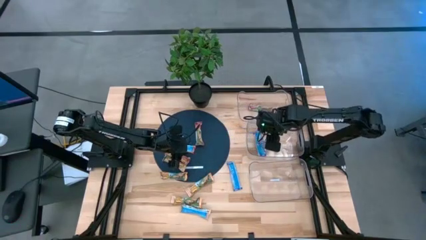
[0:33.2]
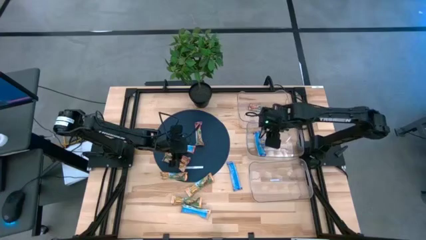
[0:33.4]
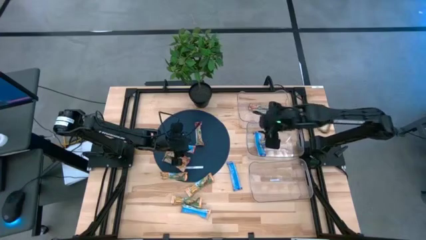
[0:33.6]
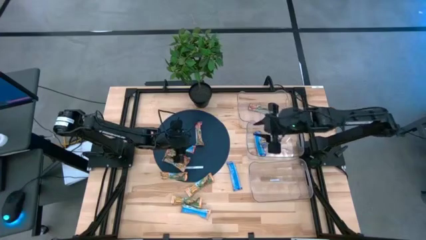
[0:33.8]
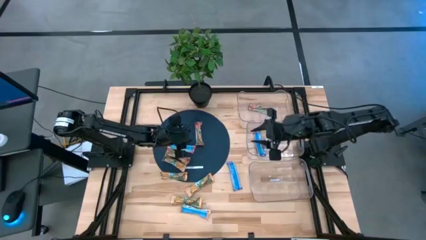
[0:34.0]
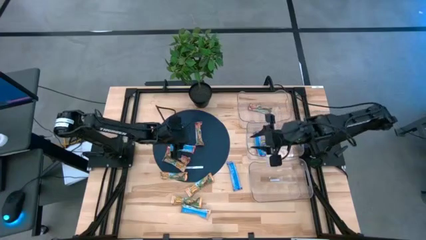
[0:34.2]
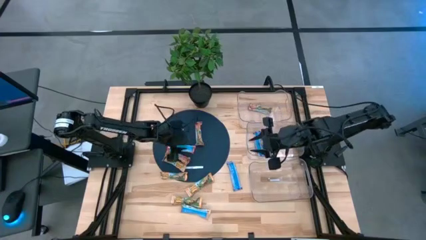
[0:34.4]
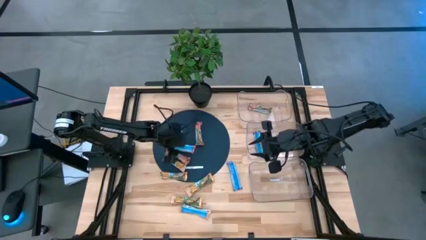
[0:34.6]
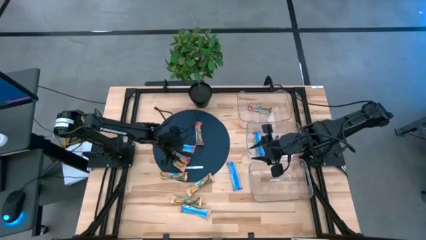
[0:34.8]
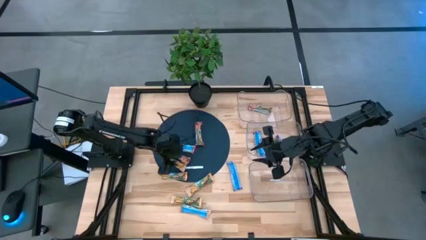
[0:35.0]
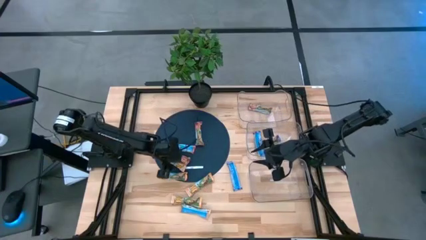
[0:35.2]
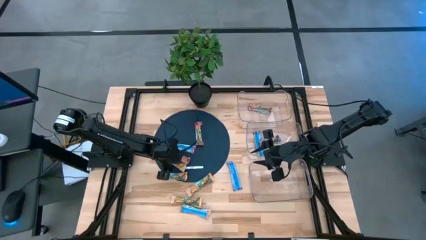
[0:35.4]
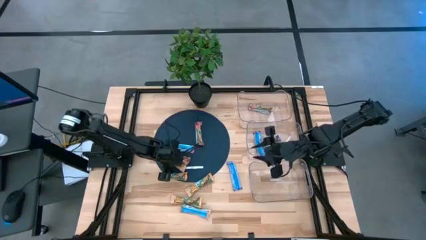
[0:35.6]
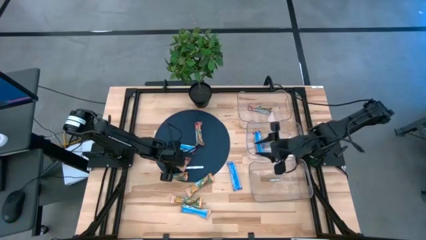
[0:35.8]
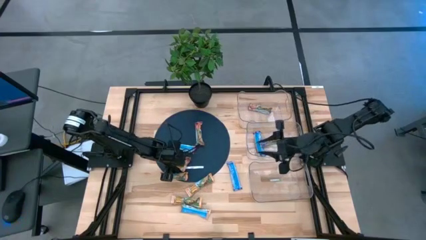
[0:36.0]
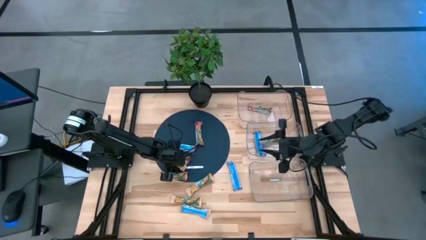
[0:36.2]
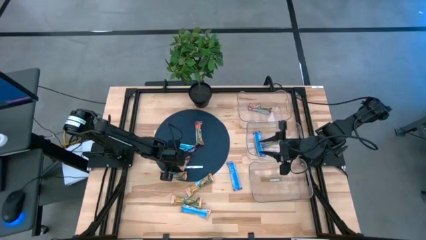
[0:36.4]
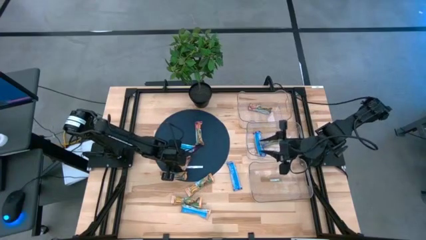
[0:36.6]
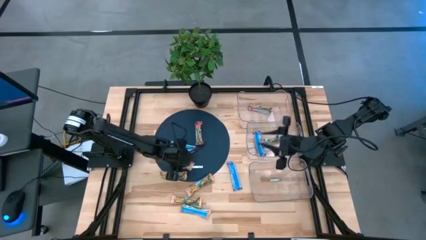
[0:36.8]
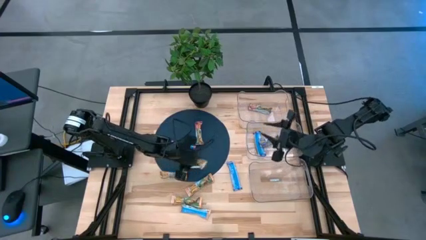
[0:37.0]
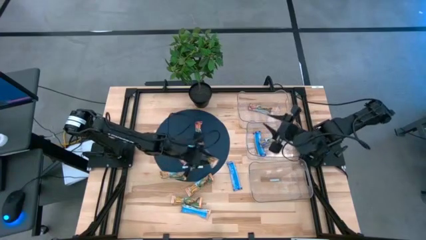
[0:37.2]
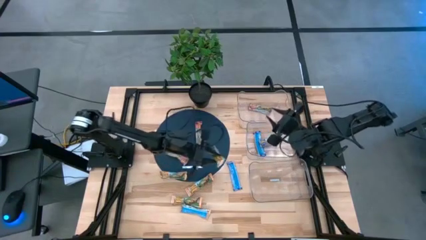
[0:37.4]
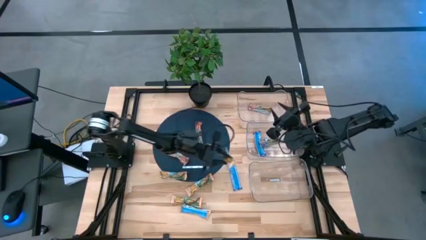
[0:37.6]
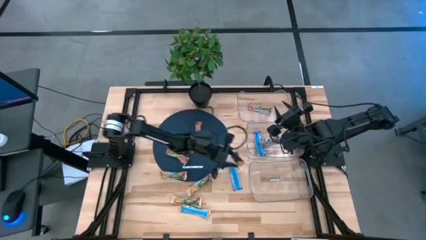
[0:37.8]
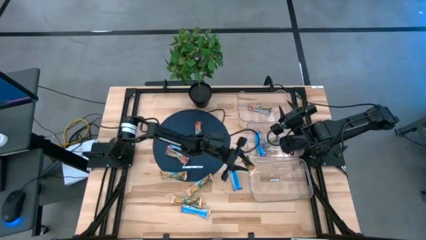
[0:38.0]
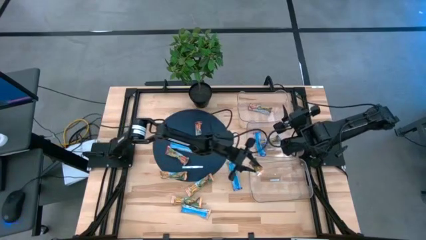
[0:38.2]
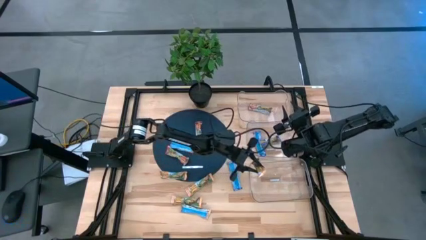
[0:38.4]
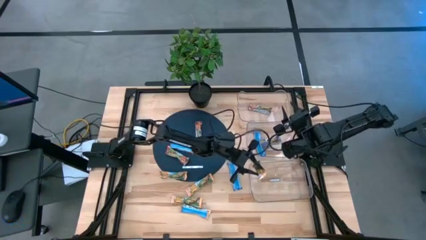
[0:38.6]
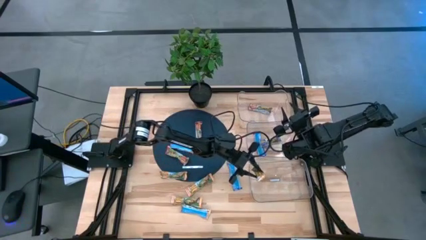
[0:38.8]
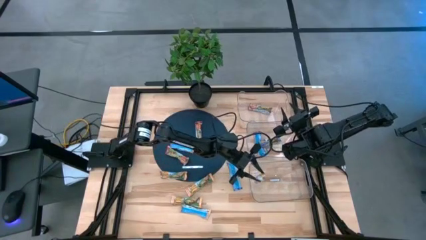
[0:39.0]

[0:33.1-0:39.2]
Task: Pick and place Granola Bars by type
Put the yellow granola bar into the bottom transparent bin

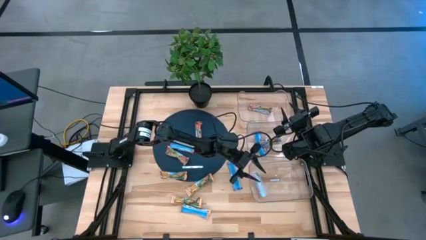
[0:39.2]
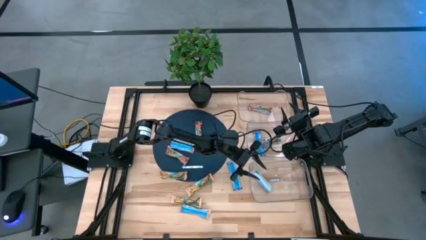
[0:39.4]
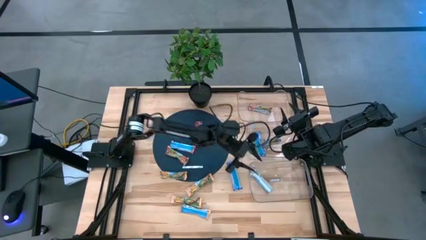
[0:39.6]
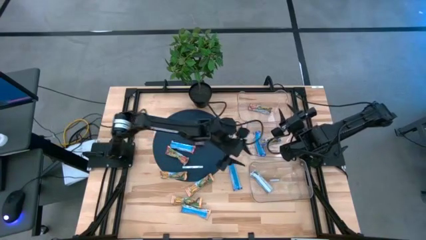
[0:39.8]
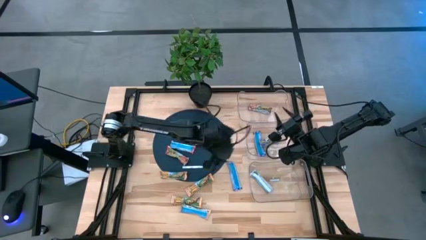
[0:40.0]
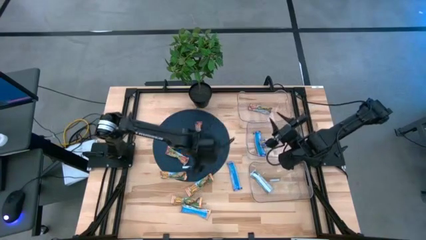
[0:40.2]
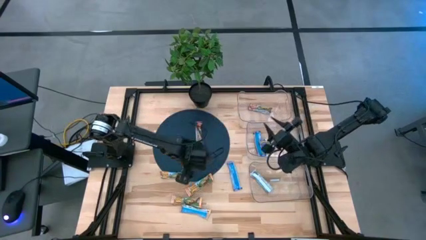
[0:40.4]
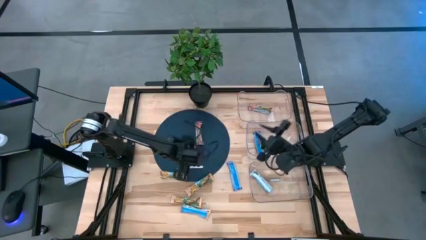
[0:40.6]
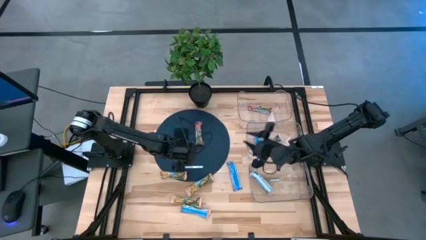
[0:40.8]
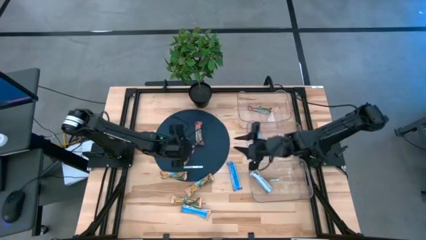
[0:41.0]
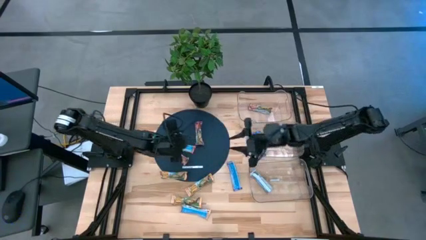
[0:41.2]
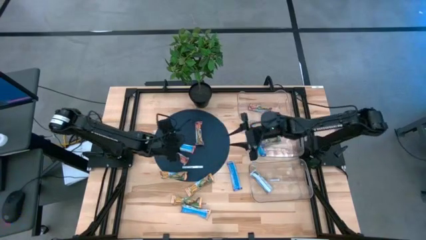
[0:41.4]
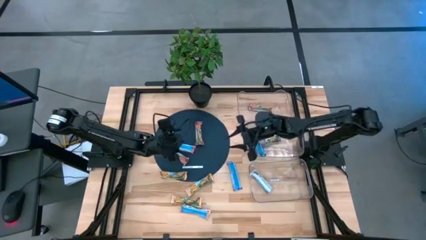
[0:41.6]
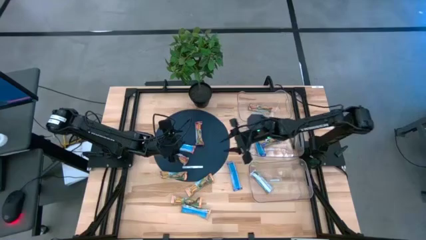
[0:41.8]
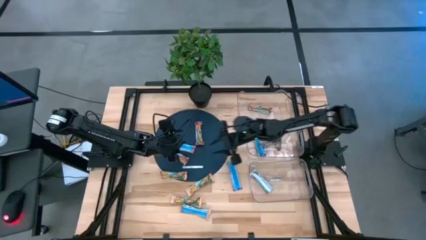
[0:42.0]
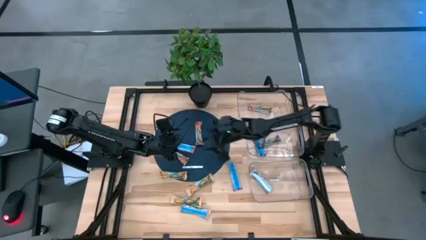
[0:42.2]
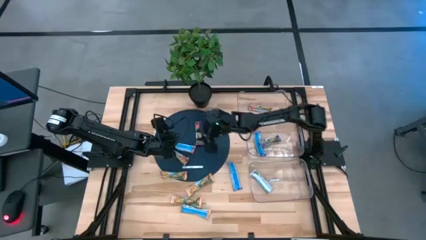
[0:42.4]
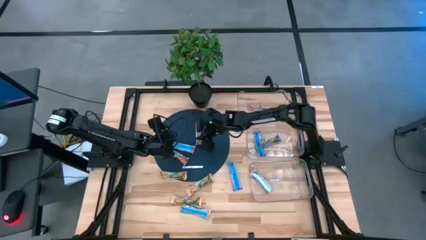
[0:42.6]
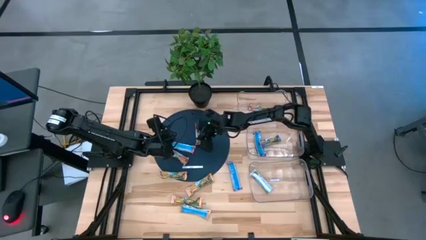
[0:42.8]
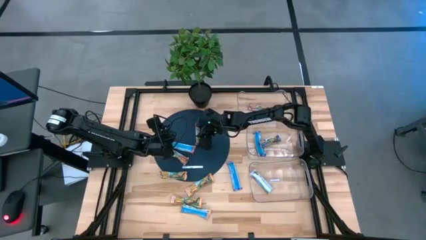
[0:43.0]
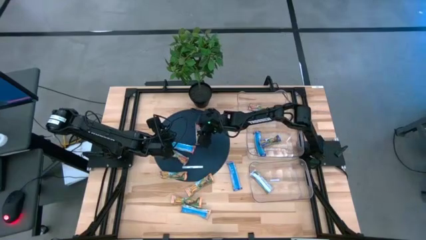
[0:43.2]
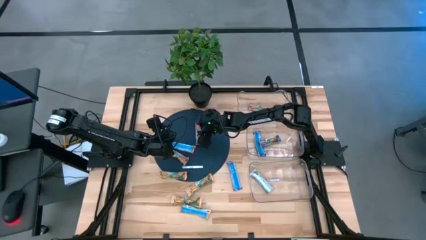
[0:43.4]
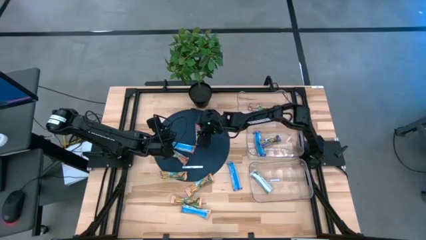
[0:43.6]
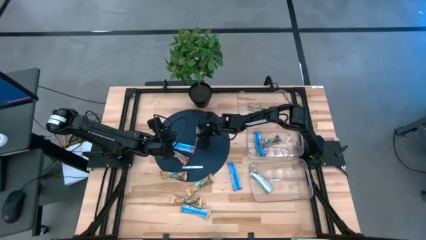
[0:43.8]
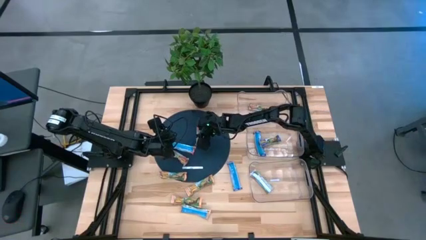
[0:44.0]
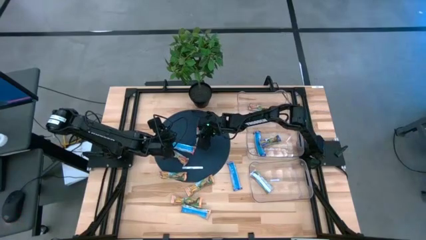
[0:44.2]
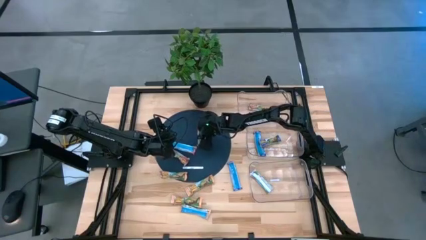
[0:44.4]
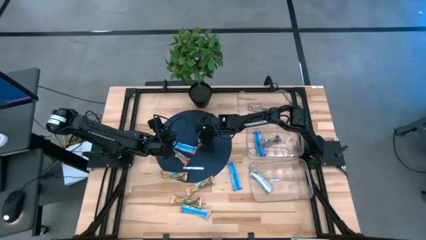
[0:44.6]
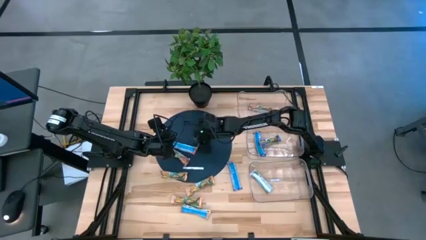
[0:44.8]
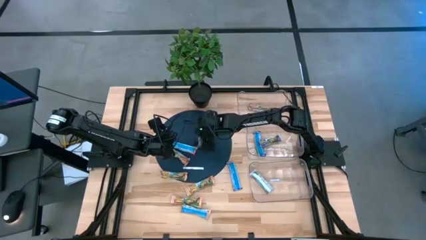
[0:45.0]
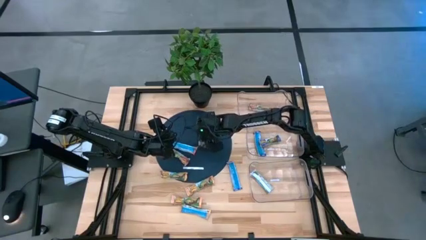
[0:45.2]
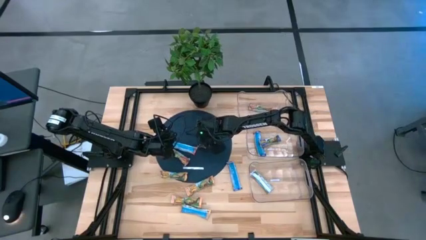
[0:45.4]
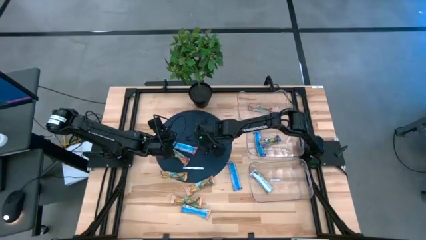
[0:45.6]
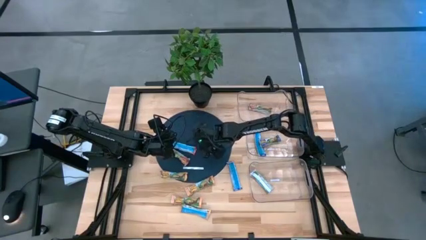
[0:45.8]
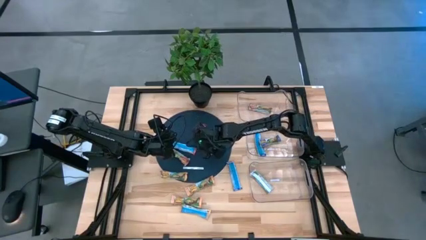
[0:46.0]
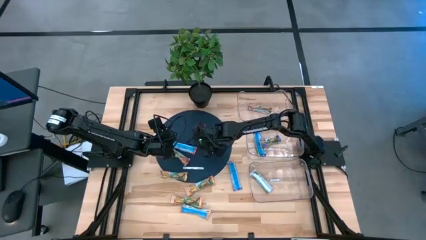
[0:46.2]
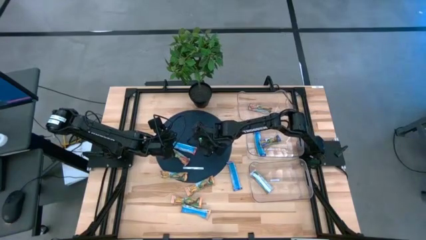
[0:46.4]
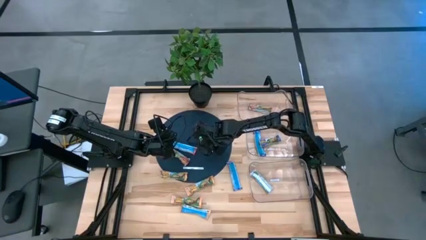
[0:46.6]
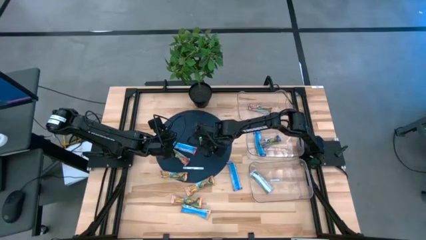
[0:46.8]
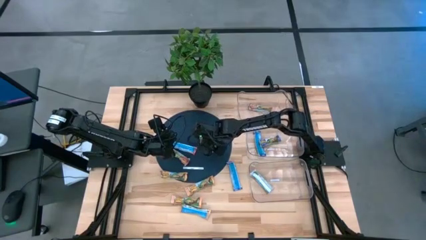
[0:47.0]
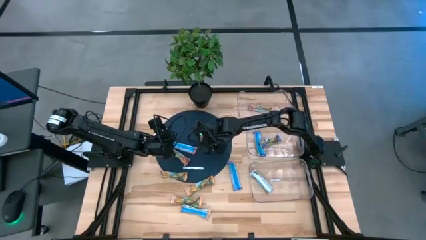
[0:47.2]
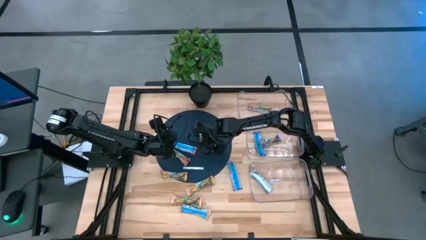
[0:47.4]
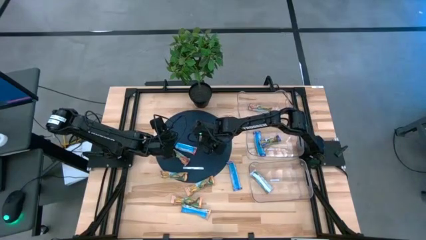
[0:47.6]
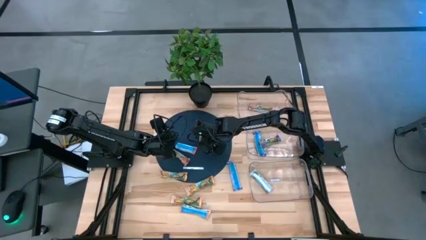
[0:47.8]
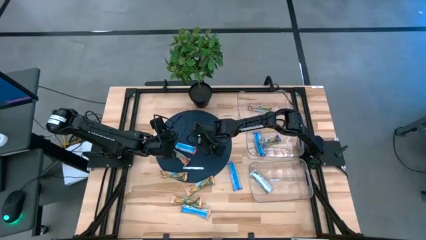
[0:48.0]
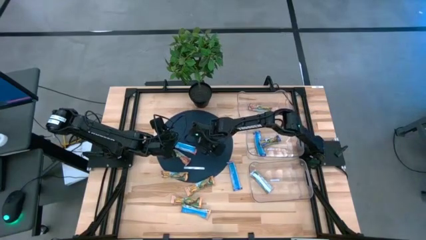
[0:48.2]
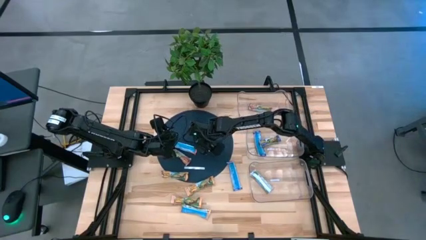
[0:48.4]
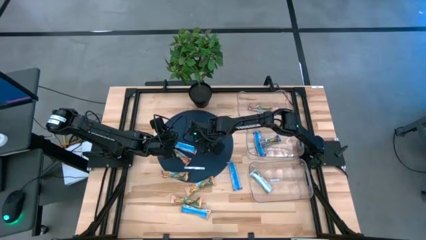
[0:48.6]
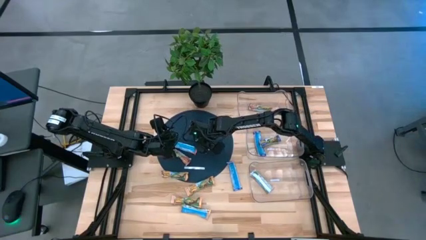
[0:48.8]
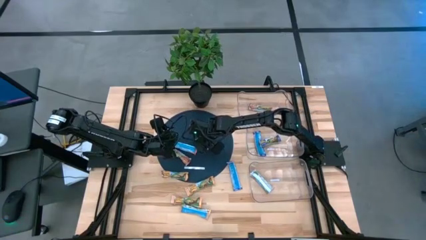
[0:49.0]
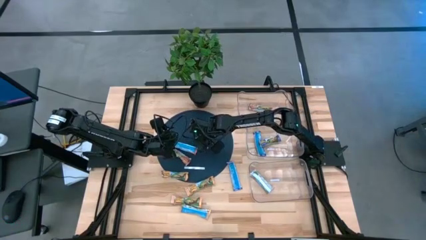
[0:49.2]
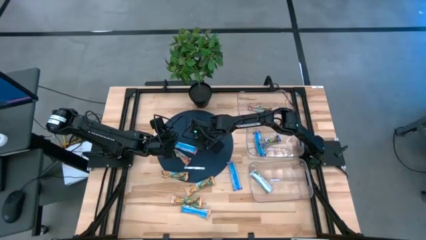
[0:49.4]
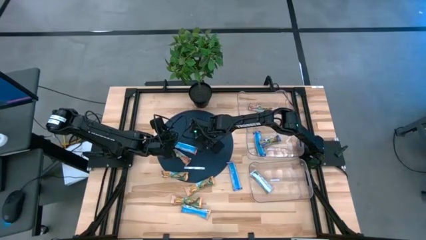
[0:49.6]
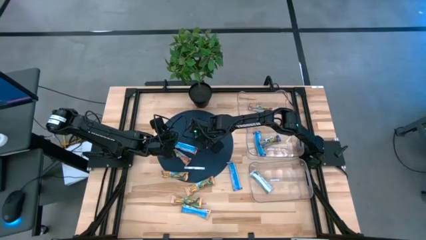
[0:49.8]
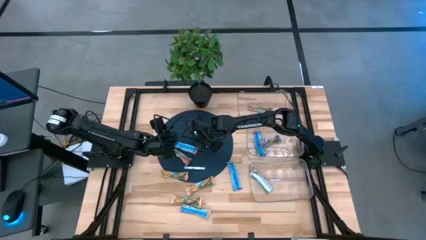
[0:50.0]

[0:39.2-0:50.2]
Put the red granola bar into the top transparent bin
